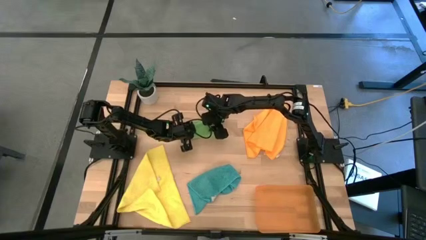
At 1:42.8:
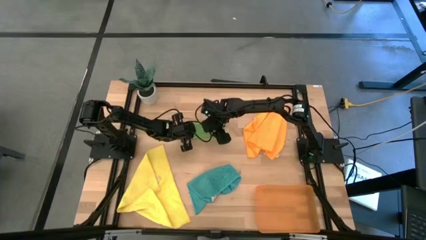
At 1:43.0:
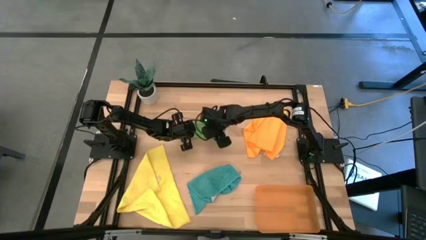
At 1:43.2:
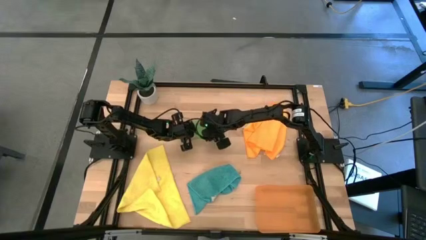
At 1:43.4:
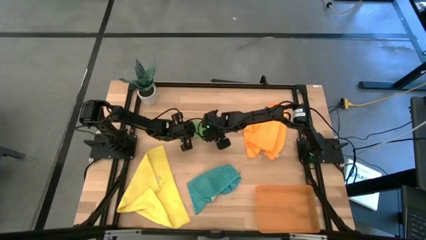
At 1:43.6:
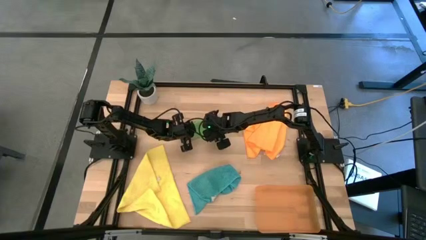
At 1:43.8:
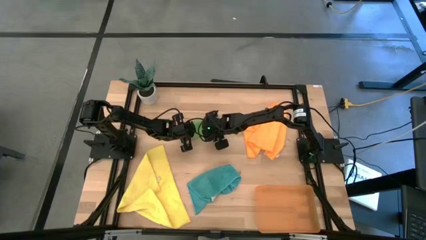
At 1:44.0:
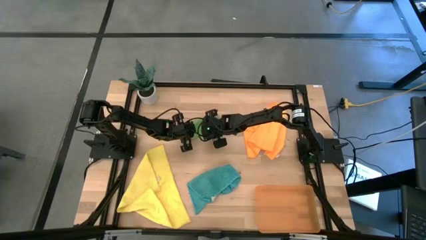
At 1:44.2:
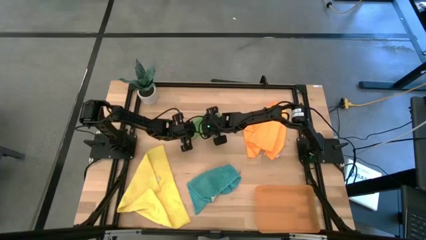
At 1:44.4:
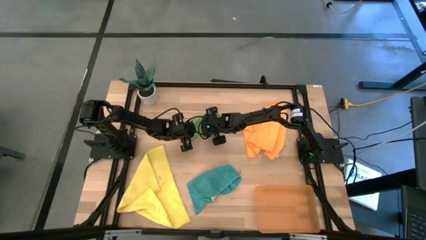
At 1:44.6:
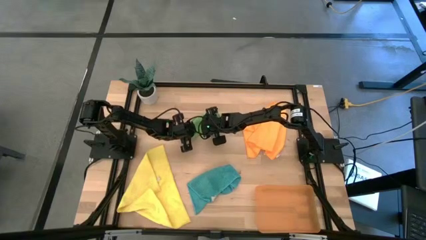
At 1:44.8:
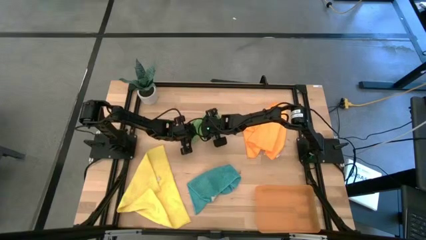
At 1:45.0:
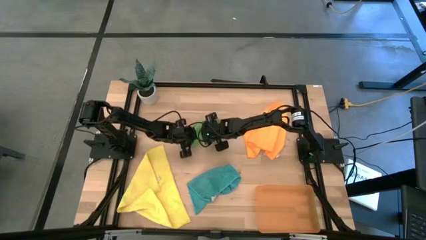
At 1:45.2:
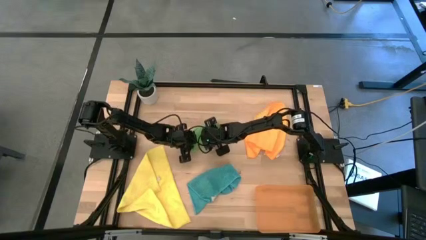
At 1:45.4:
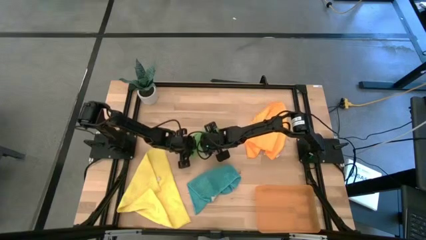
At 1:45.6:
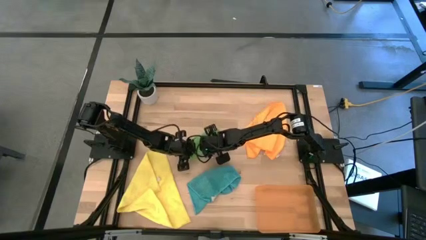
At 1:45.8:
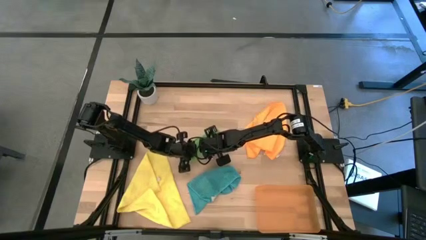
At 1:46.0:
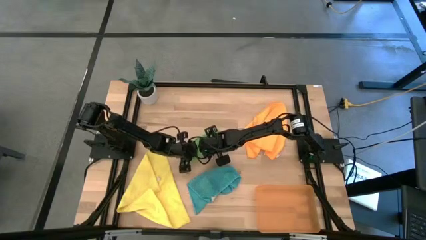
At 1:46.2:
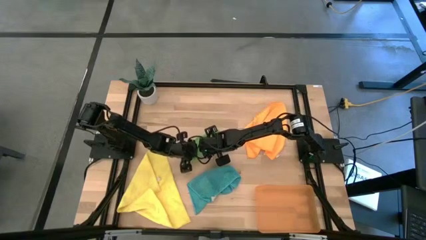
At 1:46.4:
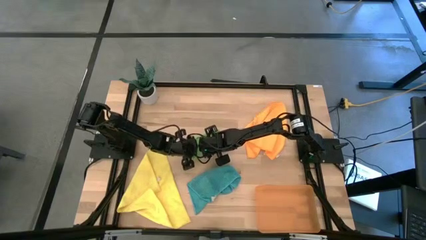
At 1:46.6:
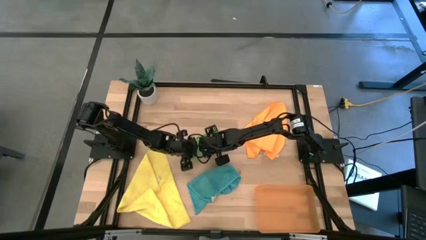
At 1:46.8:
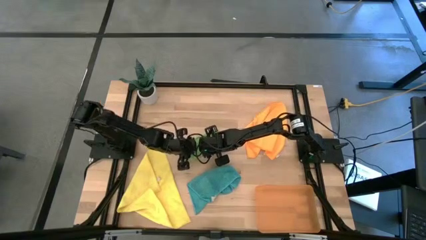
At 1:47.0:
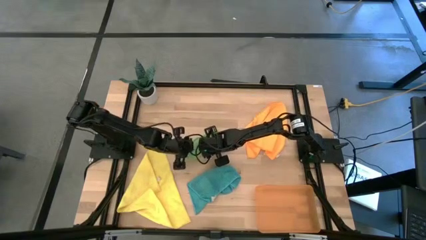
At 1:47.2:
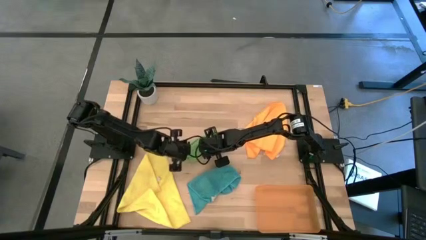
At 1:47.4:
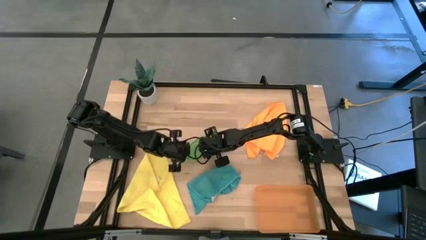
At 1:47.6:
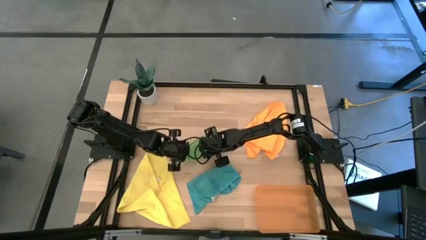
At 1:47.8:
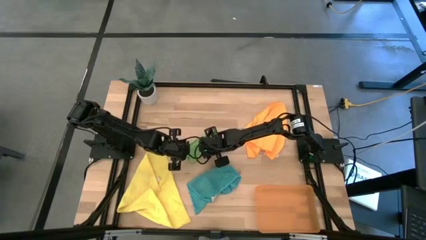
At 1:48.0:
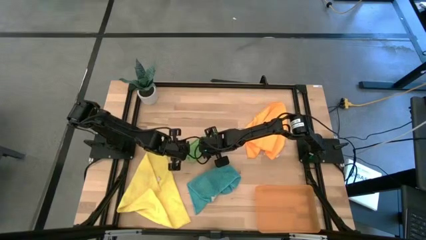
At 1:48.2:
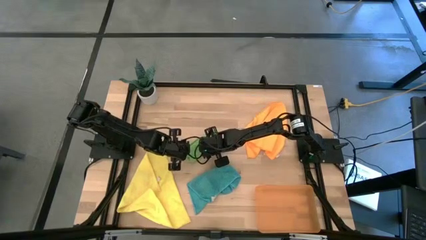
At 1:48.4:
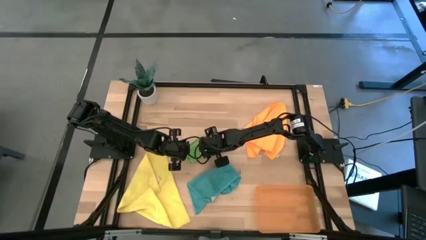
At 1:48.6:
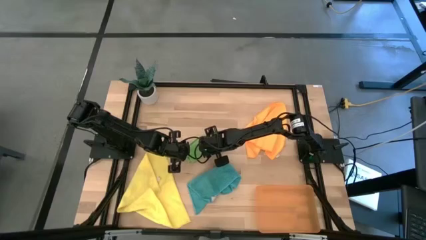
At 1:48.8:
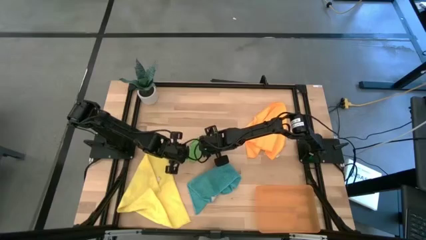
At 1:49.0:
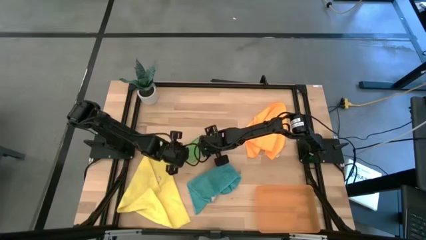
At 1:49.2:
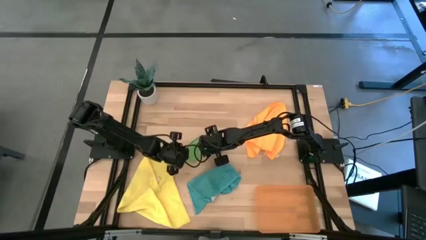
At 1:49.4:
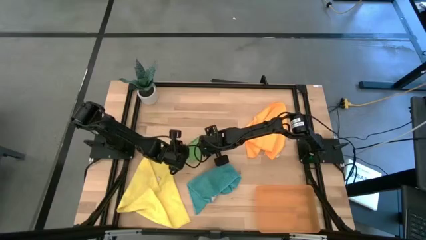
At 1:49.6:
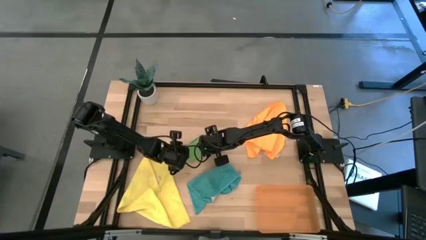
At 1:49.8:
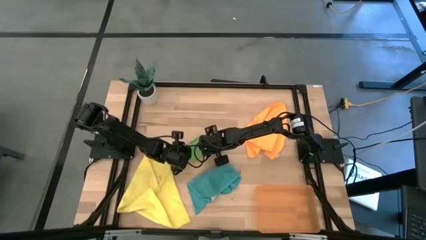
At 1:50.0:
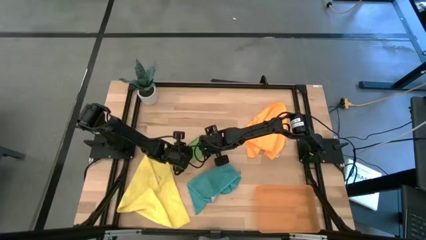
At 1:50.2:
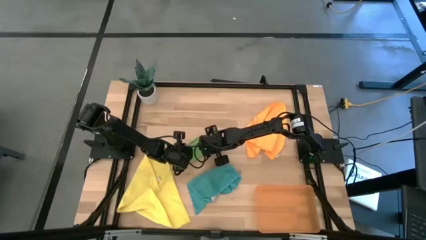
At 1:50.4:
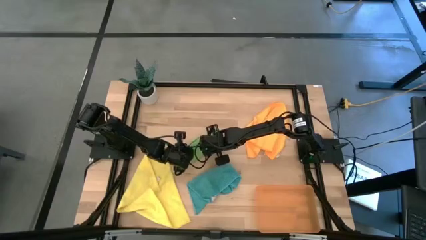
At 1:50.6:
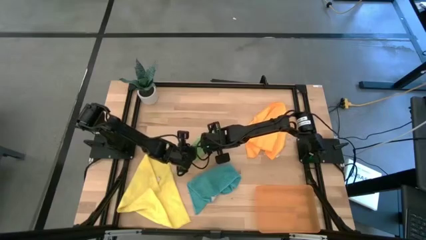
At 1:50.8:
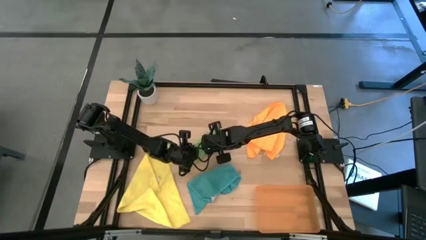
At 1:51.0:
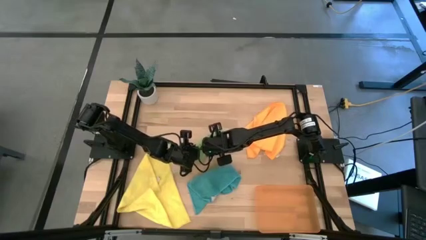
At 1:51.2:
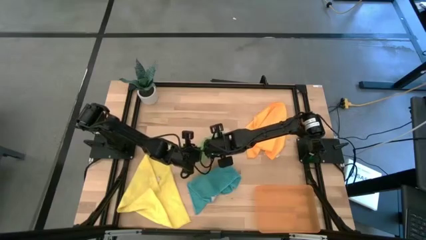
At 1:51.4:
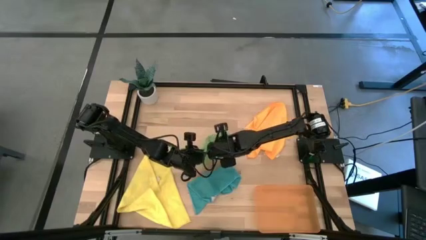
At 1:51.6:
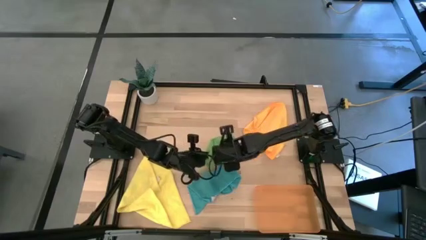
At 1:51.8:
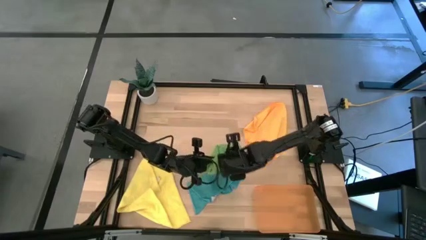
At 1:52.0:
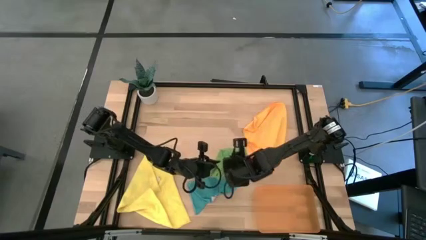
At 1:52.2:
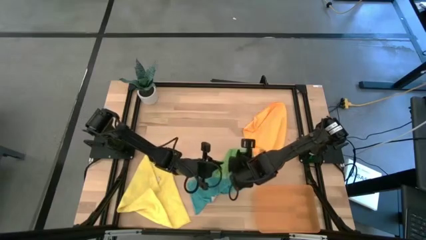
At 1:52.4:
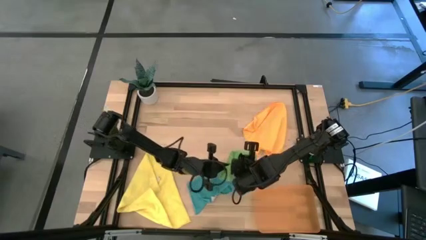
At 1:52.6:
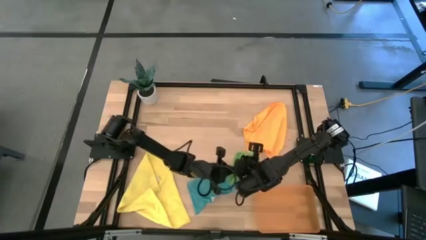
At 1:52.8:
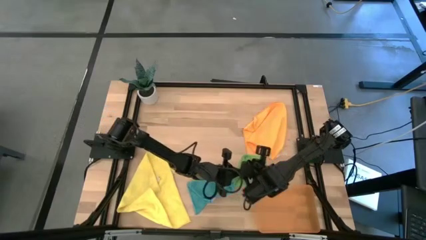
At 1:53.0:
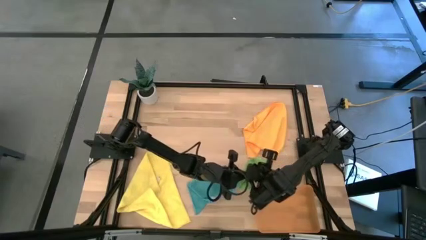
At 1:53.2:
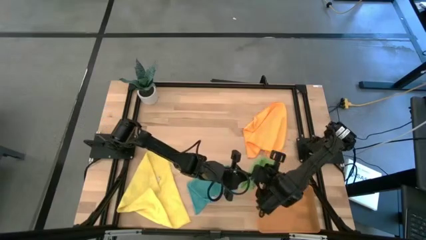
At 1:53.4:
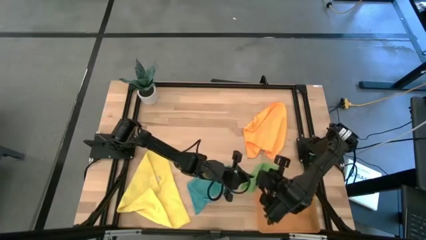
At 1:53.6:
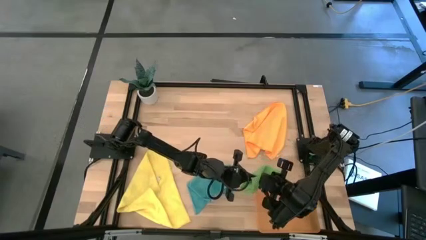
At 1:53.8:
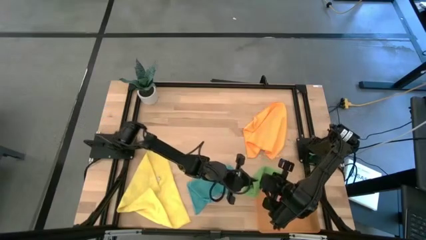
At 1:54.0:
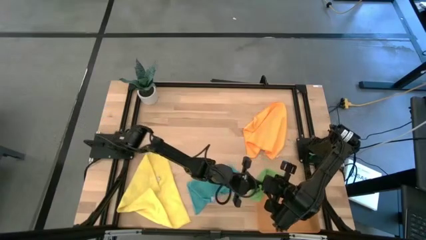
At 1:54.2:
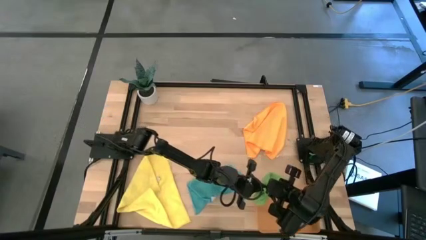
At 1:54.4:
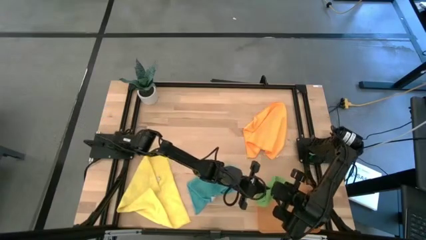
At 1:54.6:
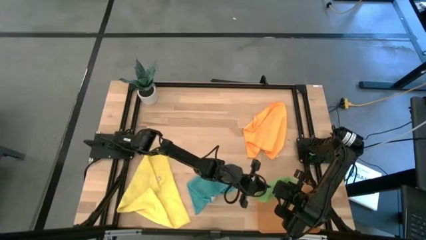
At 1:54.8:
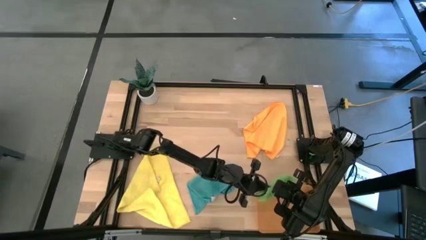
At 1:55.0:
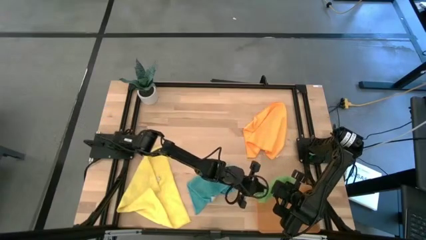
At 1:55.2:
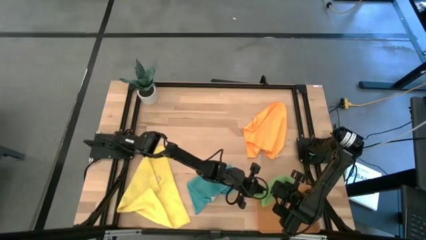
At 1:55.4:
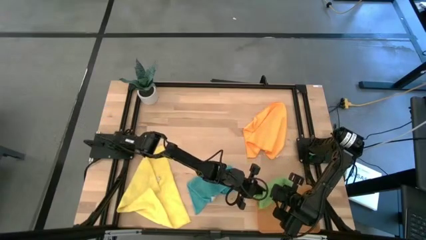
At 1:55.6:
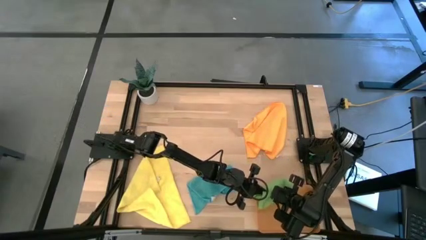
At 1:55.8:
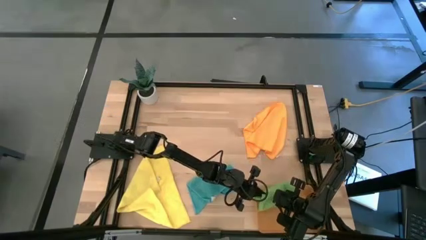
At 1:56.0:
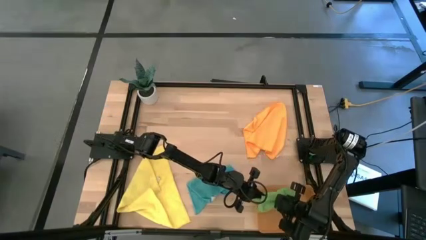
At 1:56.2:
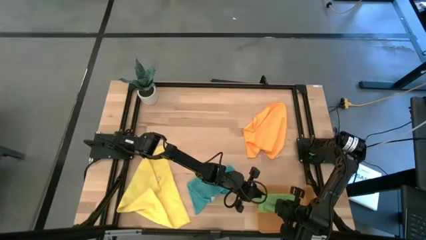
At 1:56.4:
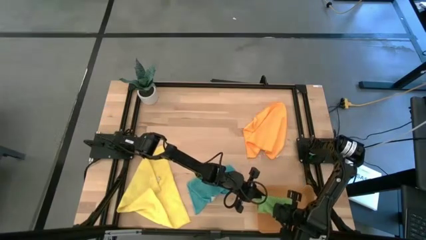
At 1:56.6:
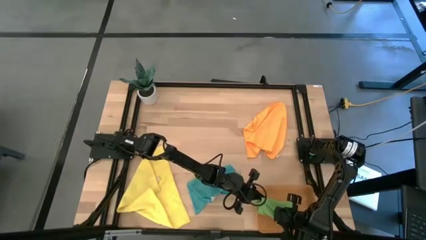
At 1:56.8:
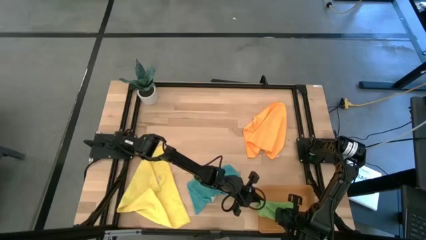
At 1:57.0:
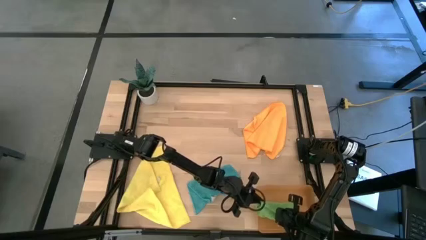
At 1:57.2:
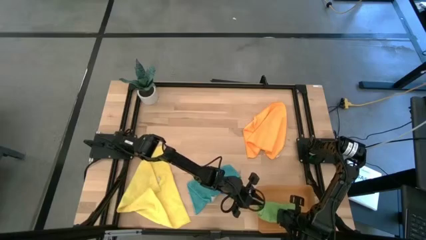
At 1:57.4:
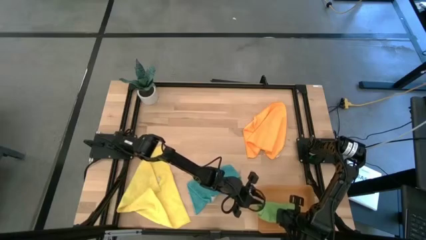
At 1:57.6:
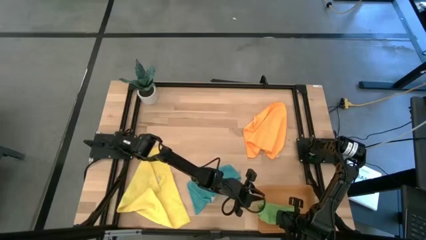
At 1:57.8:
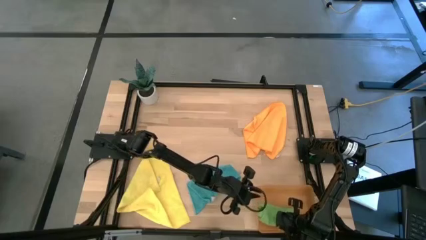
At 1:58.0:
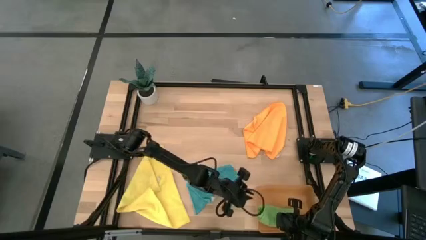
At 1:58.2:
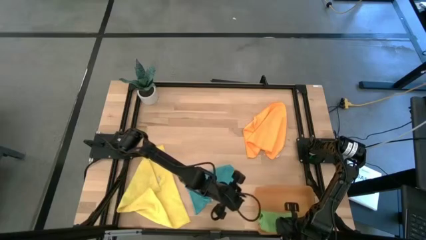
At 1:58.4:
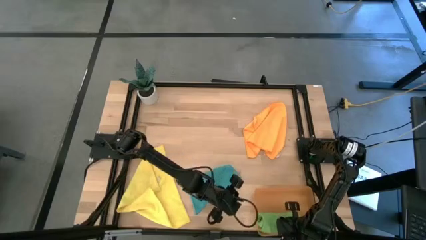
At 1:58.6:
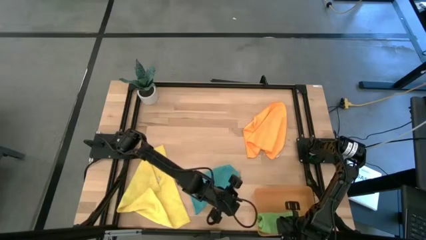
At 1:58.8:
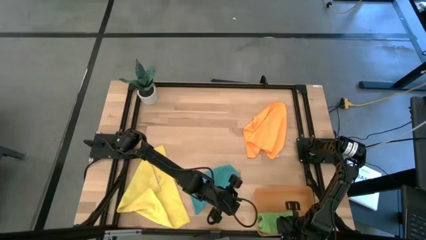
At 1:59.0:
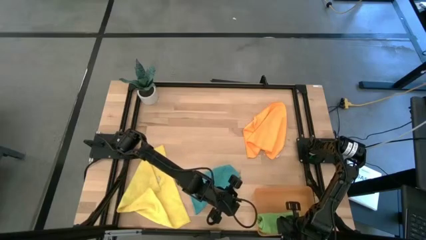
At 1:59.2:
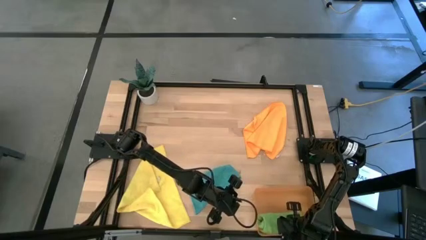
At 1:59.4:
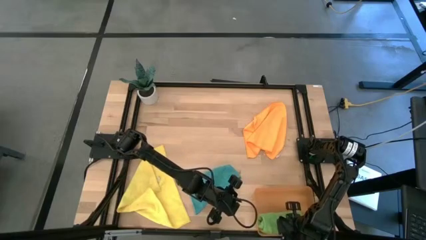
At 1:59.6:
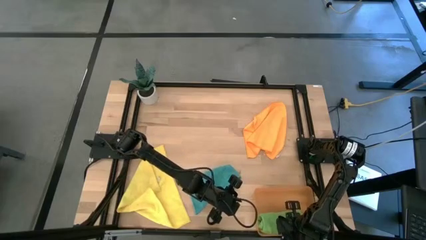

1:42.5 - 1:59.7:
Task: Roll microfiber towels into tight, uniform cylinder then place into a basket
Put the green microfiber towel into the orange bin
